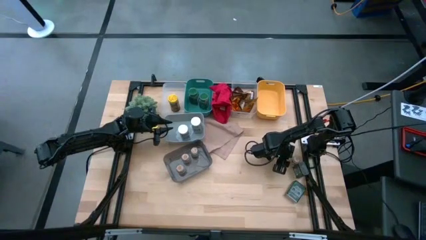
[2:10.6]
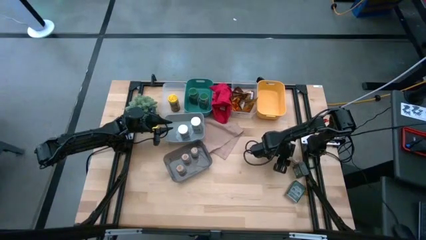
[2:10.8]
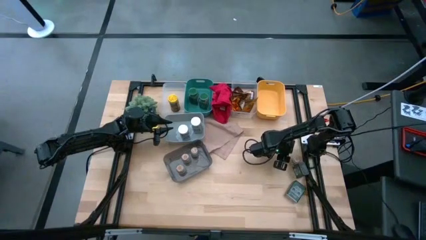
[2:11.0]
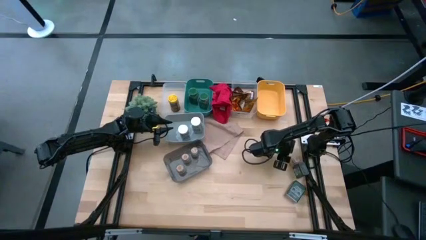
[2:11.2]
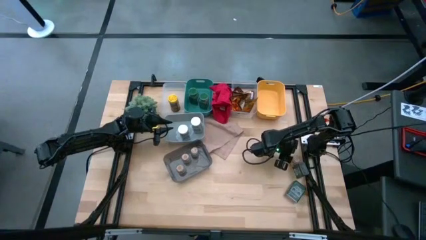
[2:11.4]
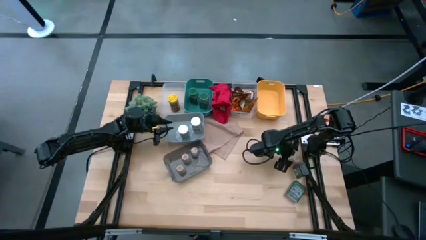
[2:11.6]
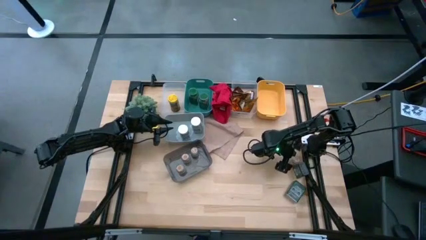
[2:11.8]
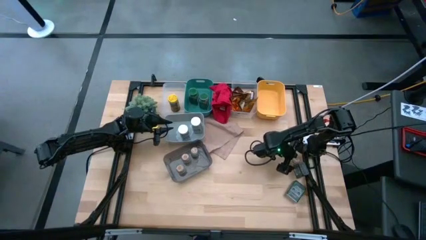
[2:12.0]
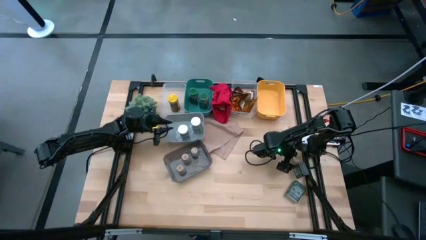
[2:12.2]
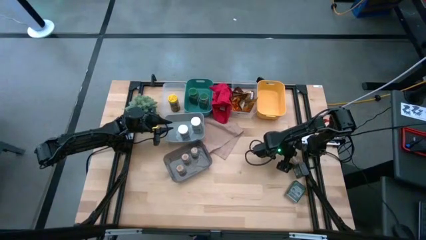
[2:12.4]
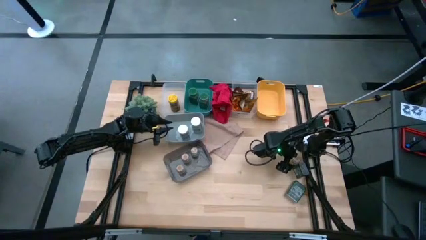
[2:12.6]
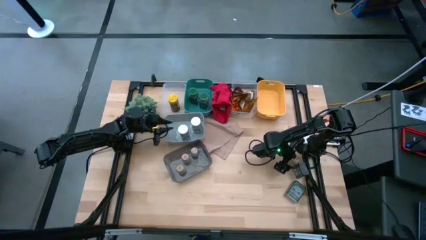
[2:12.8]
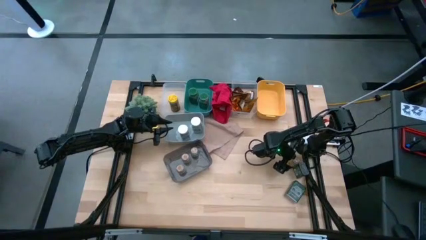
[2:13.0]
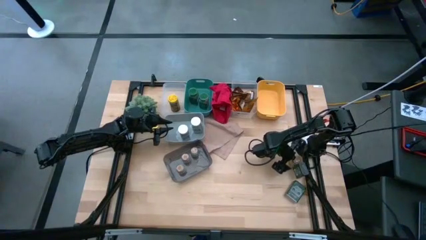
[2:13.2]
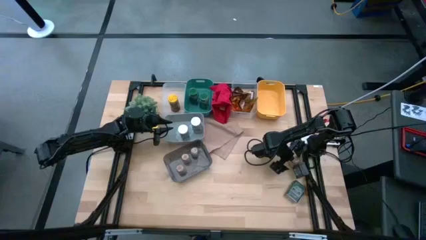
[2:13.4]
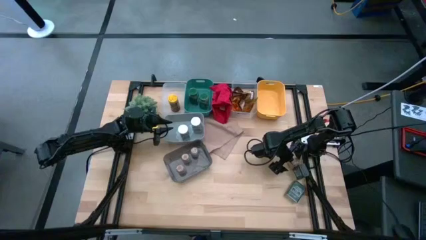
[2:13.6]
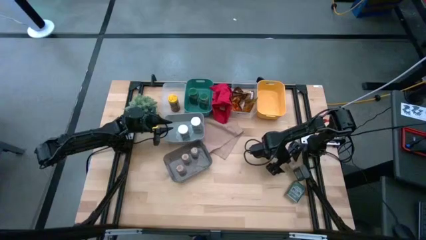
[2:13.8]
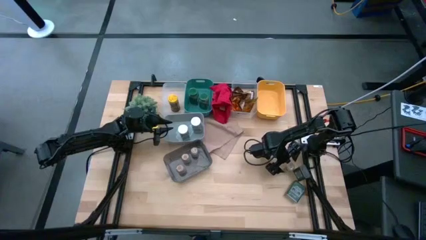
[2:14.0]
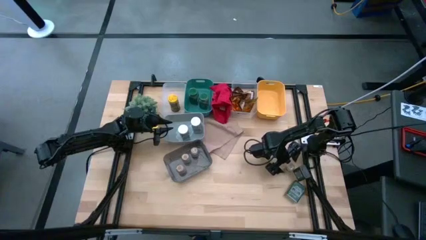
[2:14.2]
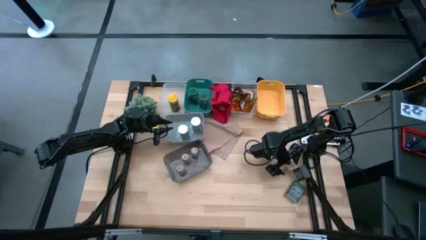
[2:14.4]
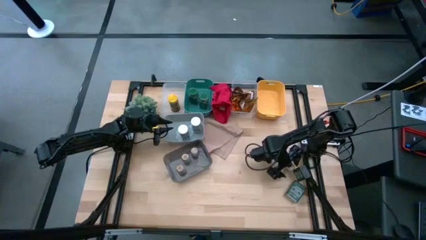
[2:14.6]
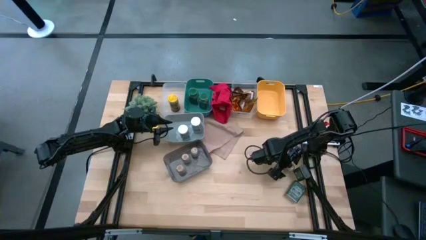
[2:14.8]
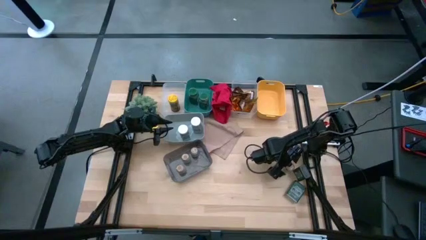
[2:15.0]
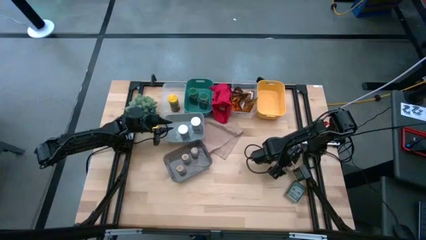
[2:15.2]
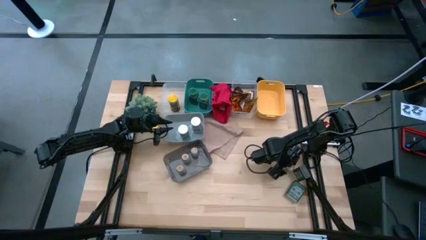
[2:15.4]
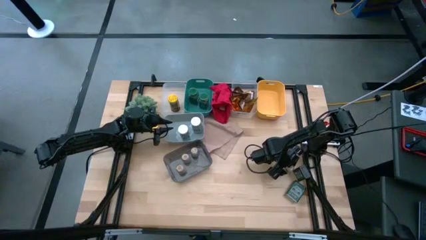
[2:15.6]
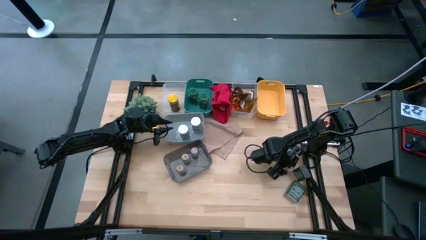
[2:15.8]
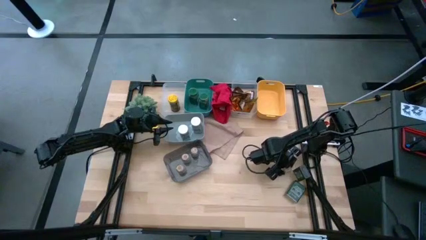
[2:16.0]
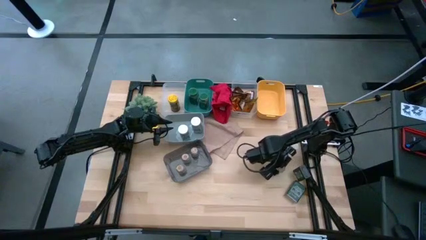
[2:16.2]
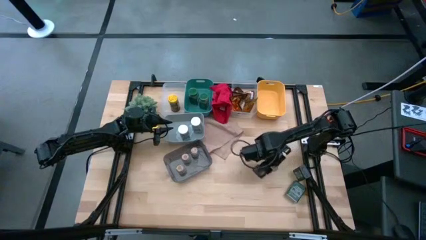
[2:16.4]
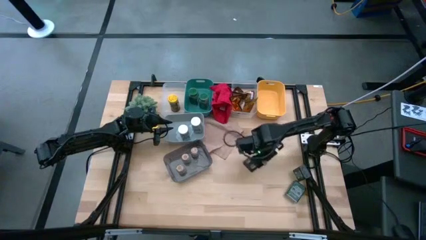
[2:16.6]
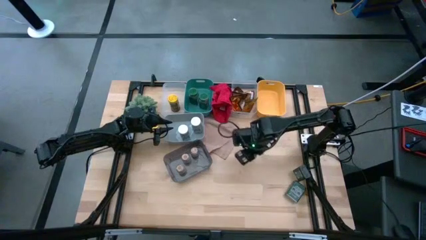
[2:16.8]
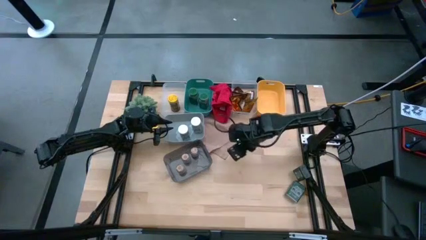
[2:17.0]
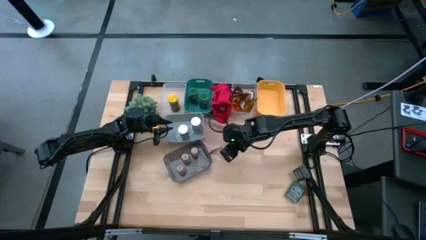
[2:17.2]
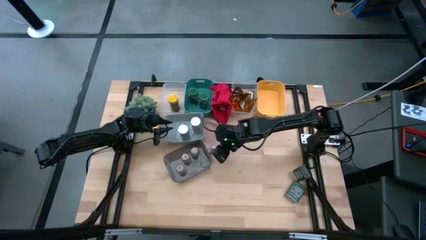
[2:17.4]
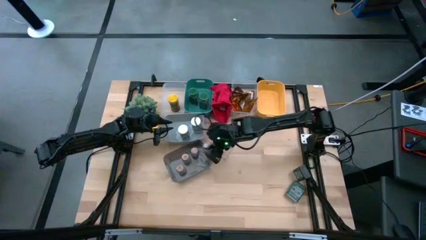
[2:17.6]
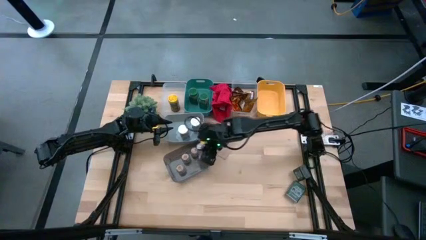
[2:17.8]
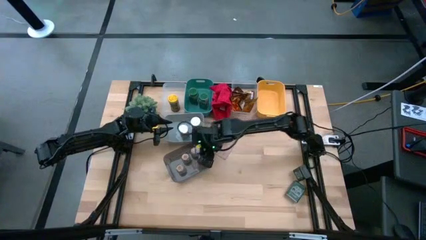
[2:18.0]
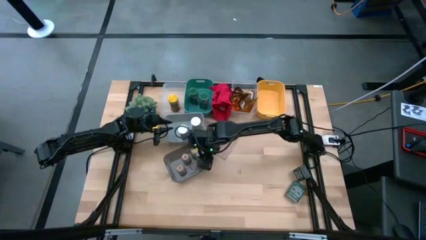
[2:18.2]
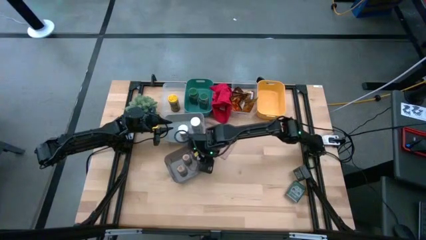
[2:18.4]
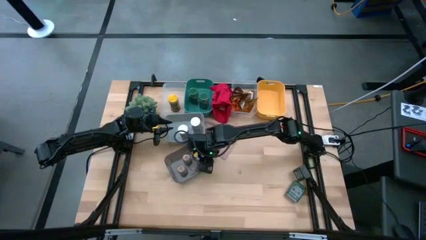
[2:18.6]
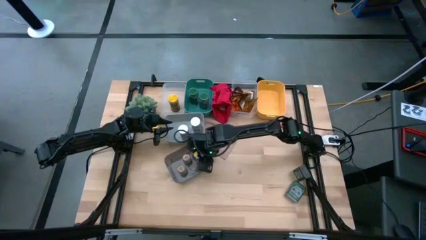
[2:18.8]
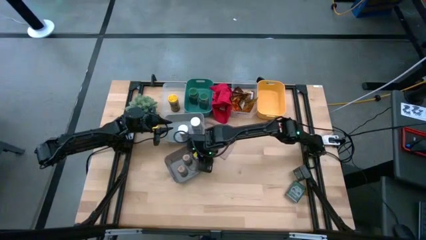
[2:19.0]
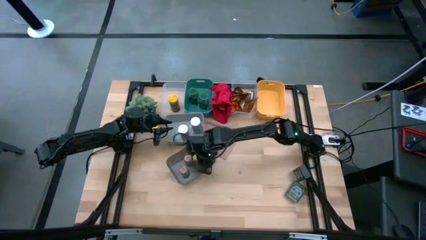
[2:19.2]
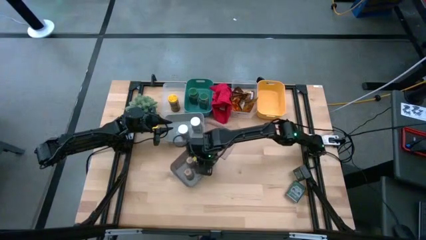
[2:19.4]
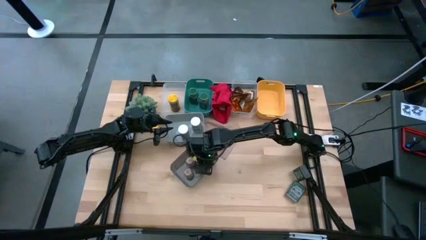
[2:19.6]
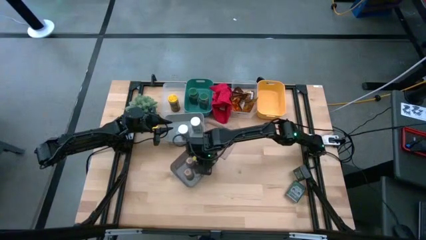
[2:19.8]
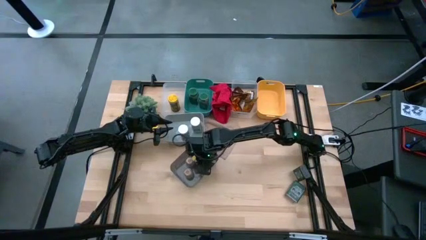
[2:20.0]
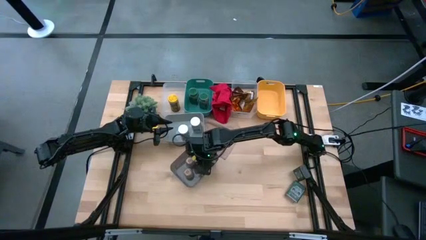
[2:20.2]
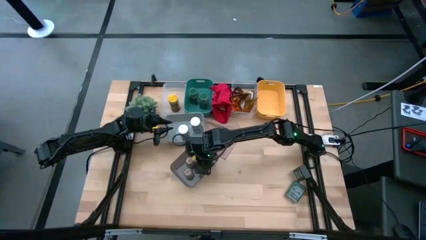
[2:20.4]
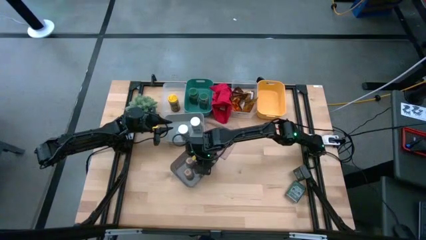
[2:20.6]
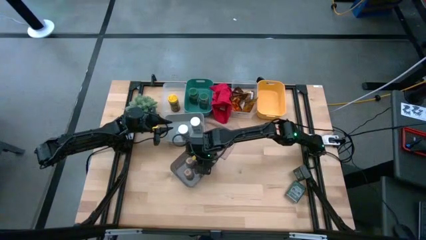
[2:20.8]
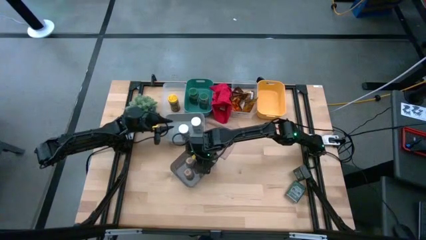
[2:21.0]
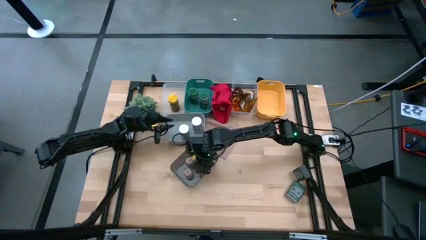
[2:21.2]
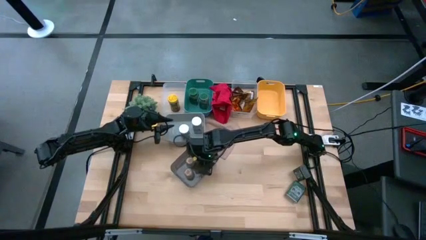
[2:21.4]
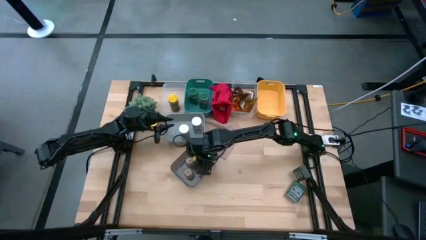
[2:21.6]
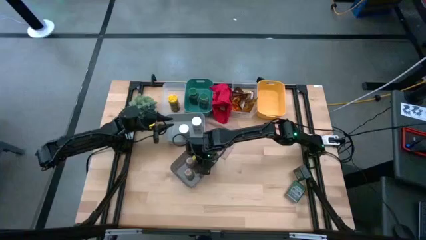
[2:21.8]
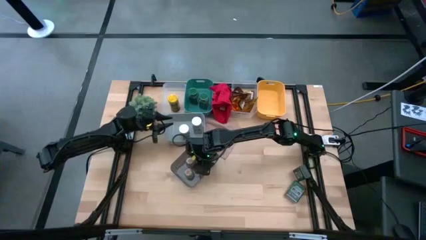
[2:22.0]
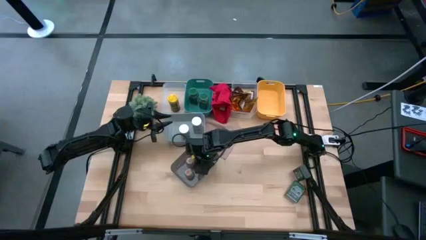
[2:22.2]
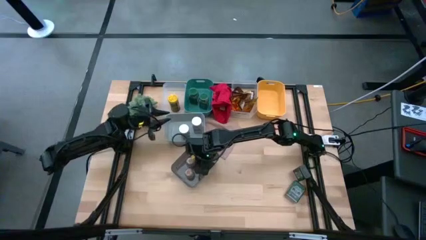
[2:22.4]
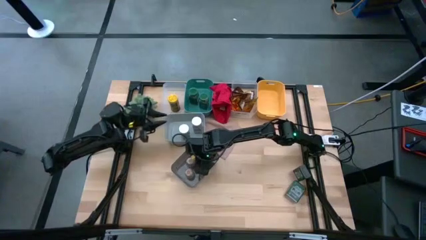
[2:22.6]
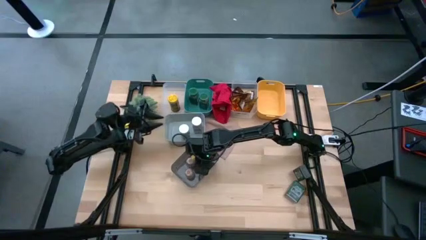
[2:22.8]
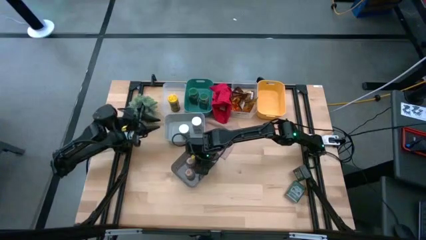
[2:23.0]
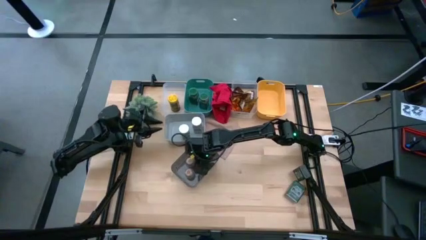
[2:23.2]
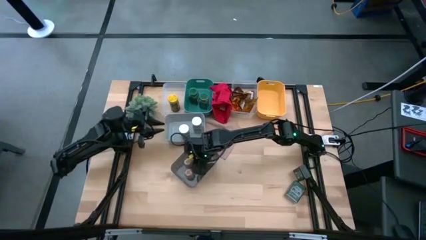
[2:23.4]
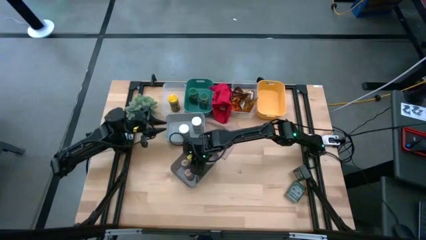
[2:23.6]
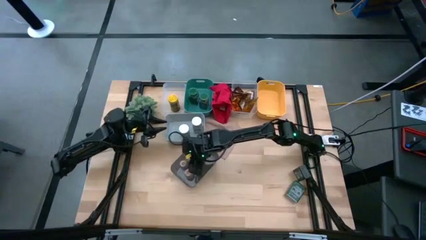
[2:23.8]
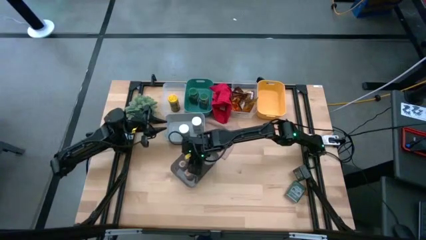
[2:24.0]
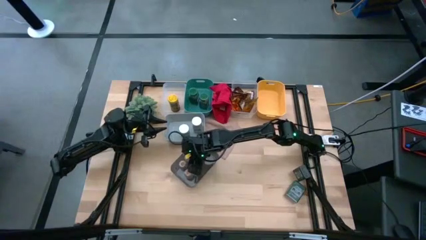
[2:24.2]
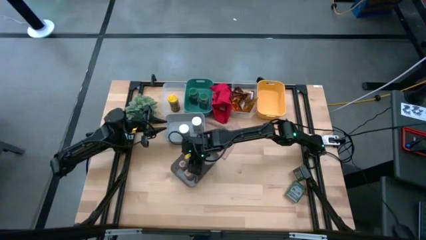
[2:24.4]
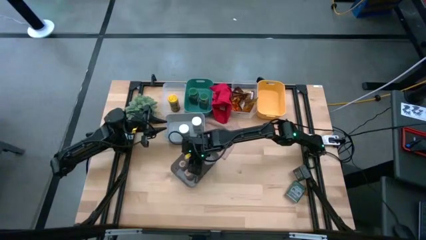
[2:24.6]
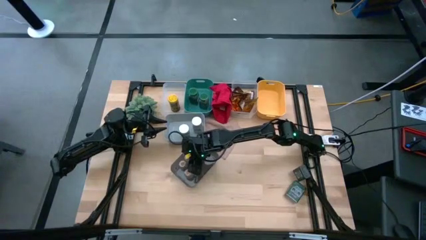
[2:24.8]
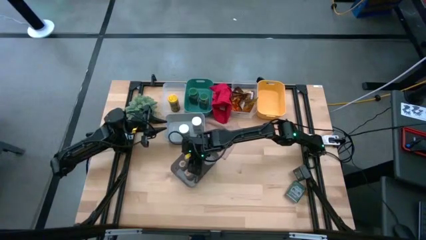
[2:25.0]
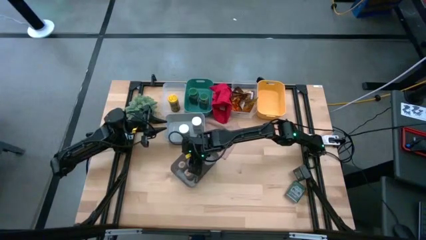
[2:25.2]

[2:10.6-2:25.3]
Task: Sort spices by type
Put the brown seasoning bottle into the black bin
